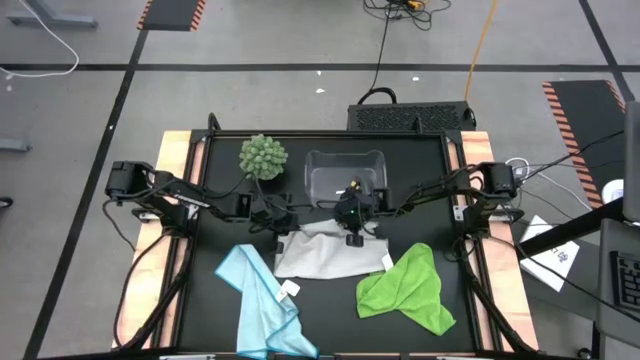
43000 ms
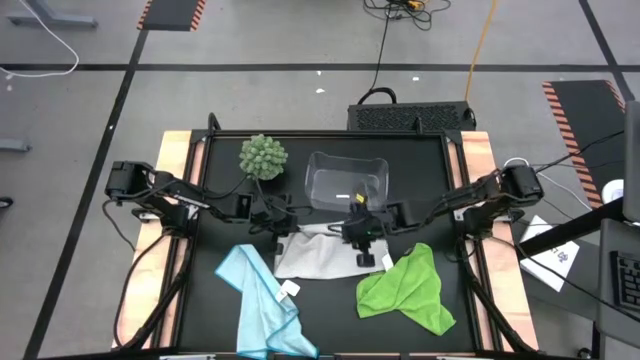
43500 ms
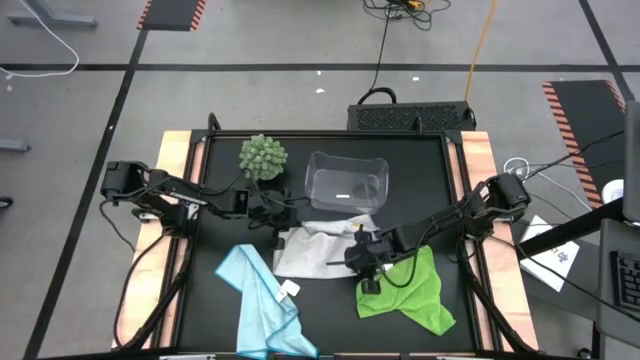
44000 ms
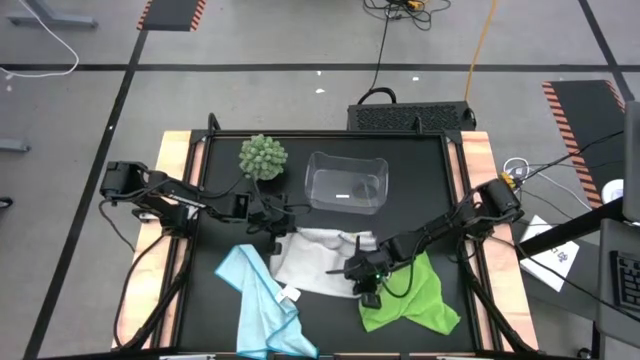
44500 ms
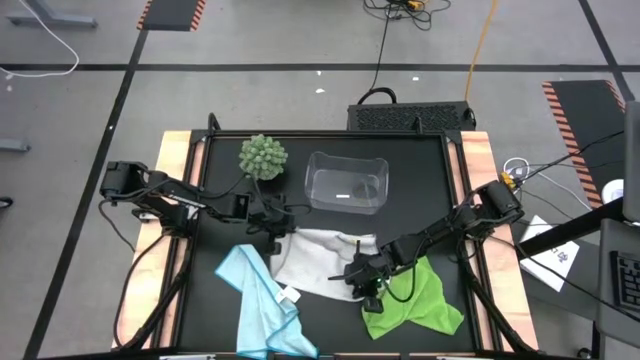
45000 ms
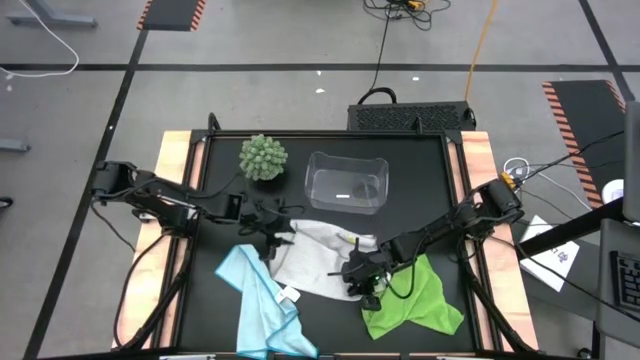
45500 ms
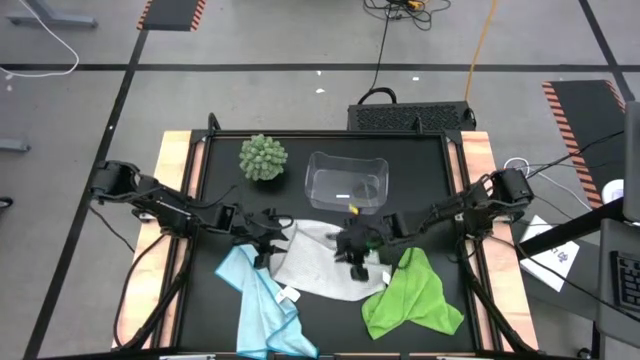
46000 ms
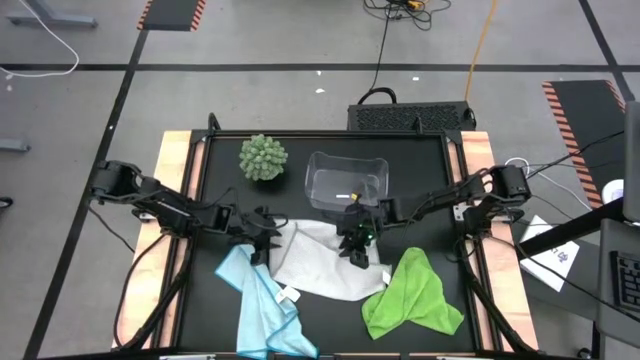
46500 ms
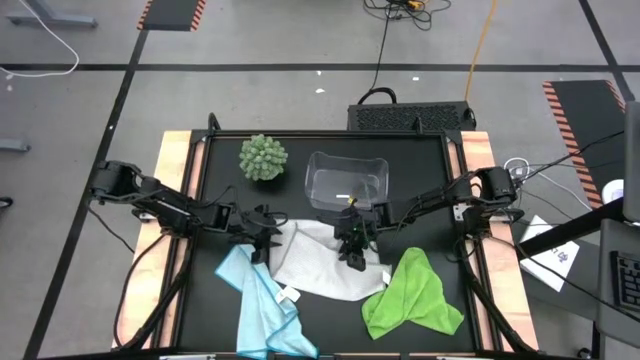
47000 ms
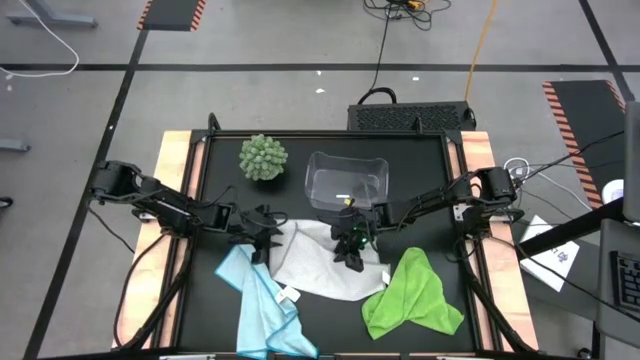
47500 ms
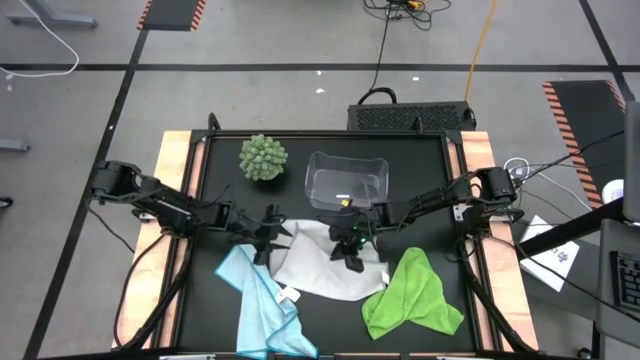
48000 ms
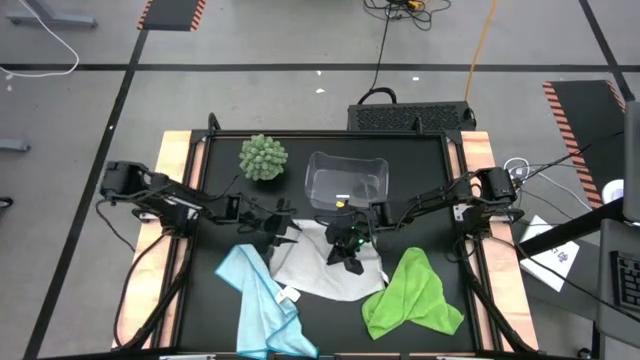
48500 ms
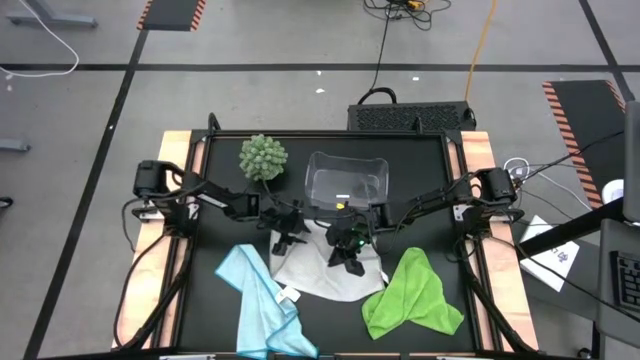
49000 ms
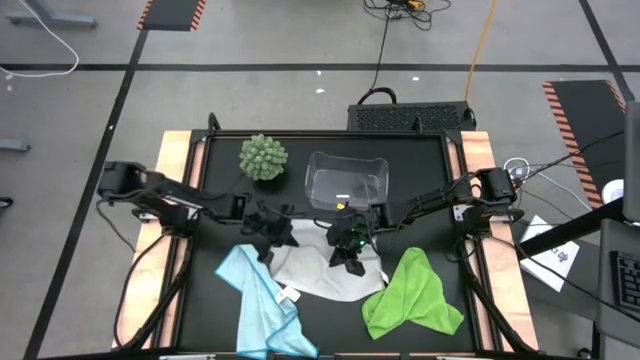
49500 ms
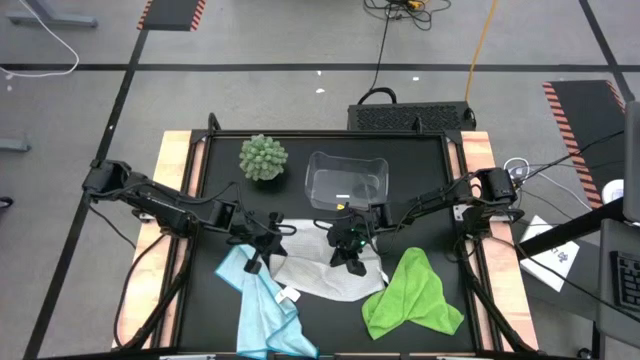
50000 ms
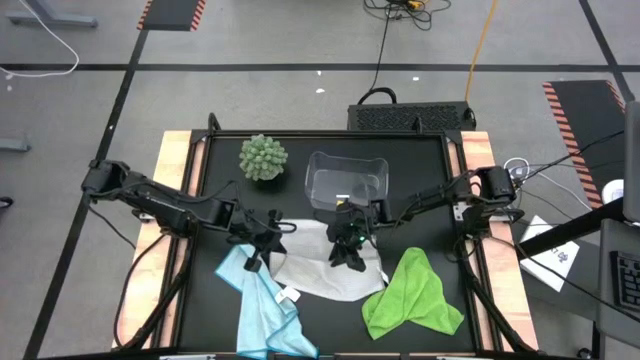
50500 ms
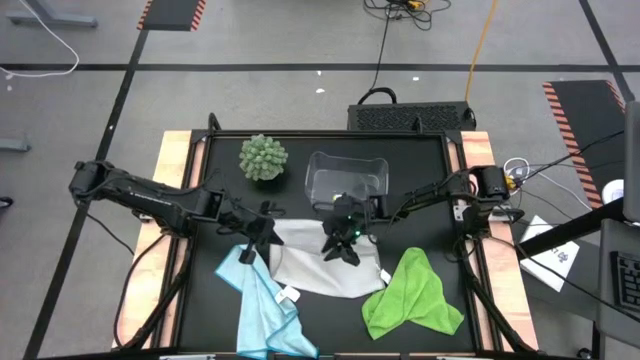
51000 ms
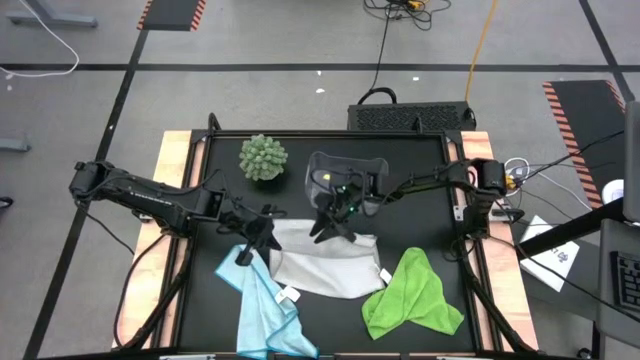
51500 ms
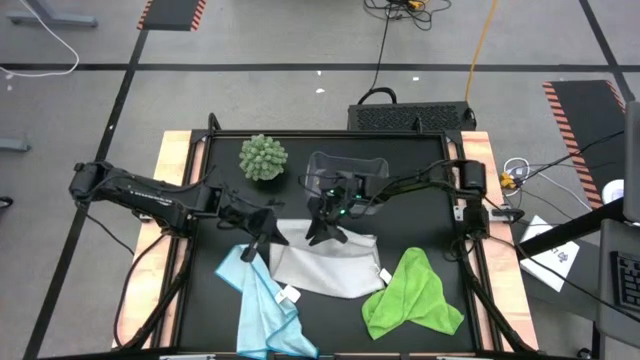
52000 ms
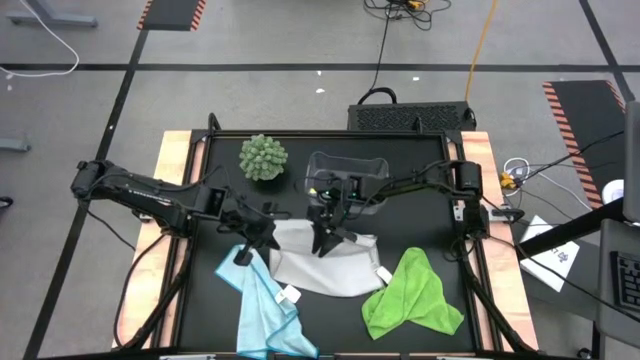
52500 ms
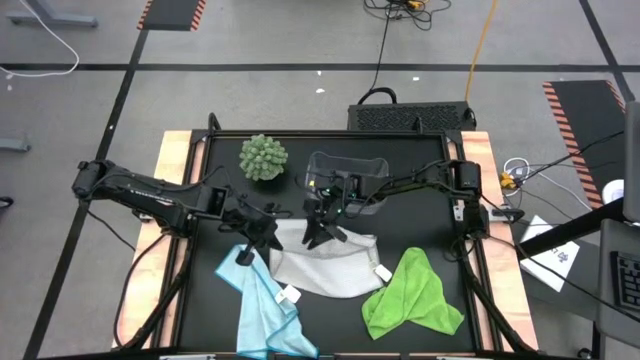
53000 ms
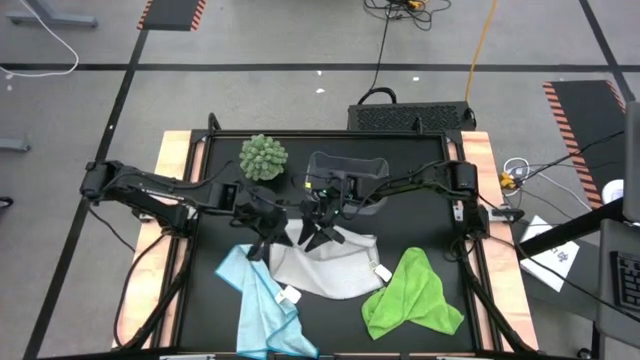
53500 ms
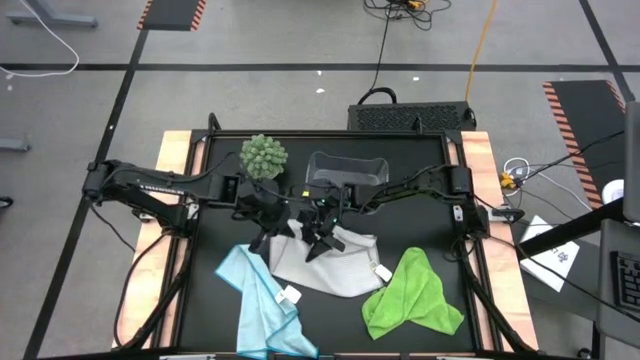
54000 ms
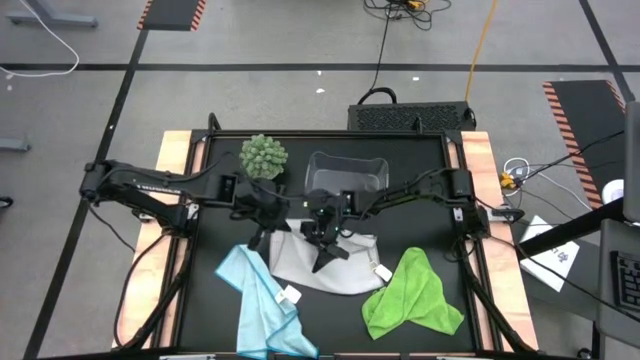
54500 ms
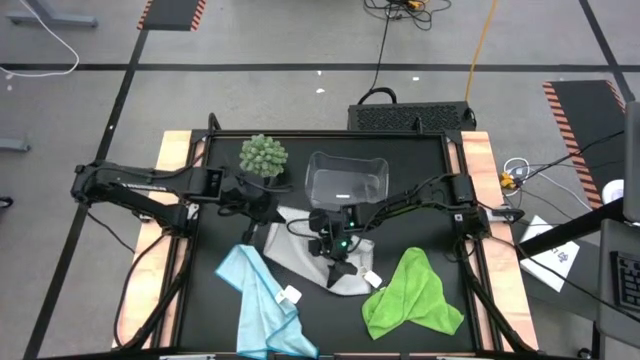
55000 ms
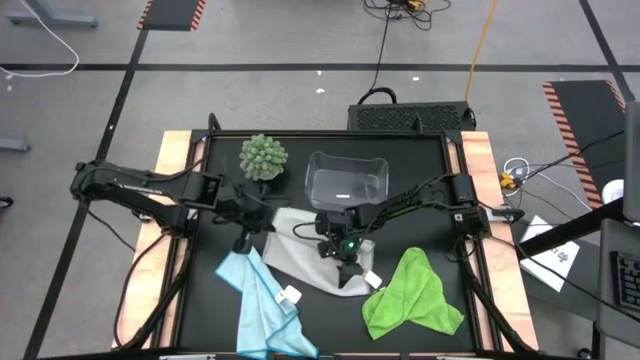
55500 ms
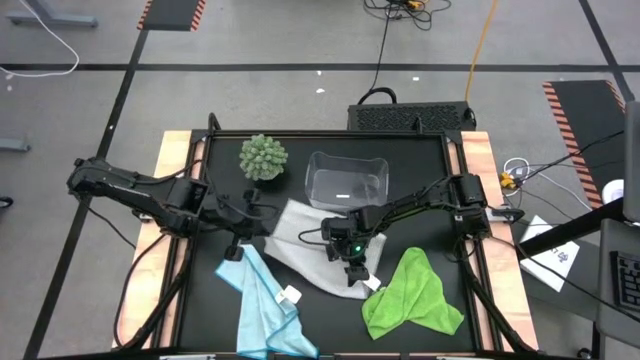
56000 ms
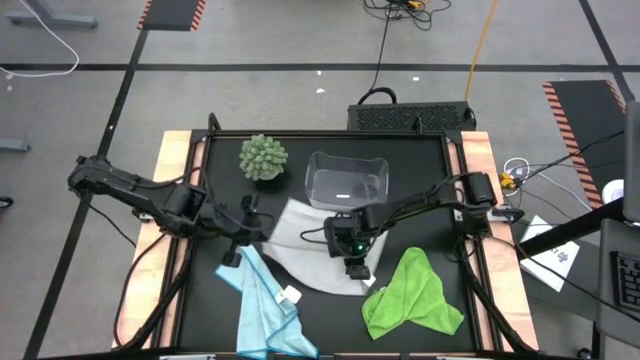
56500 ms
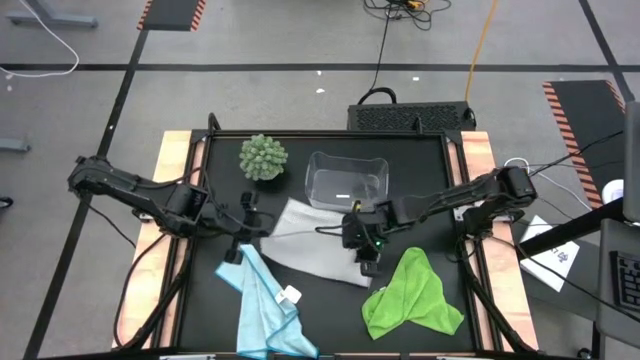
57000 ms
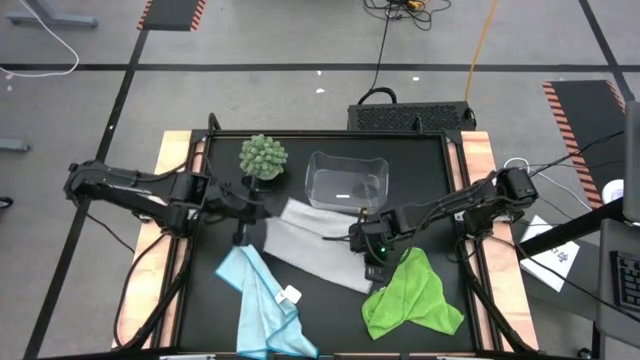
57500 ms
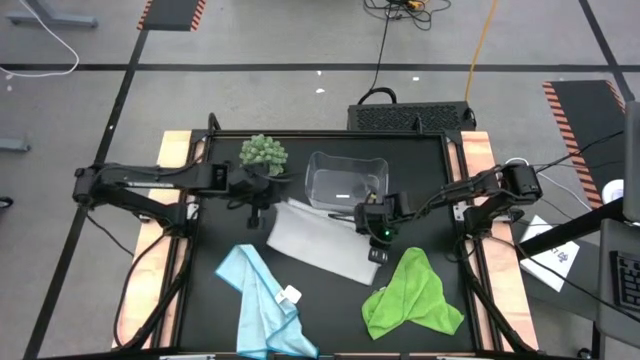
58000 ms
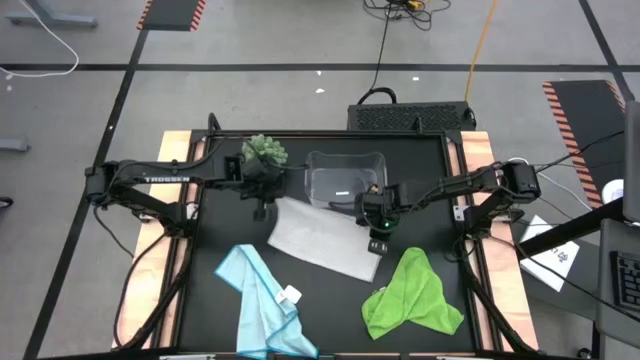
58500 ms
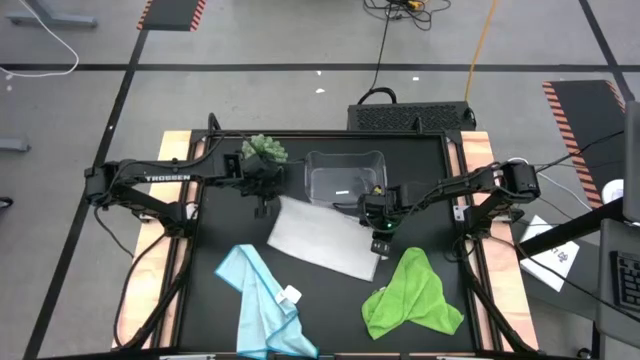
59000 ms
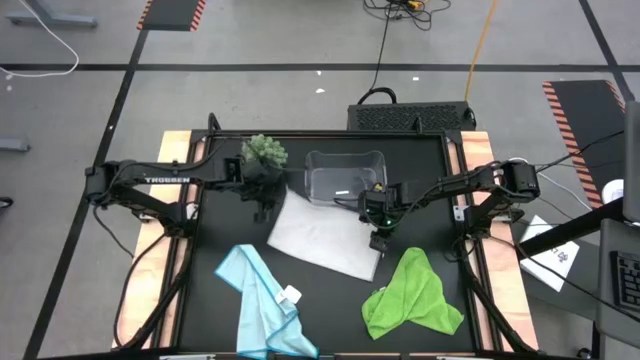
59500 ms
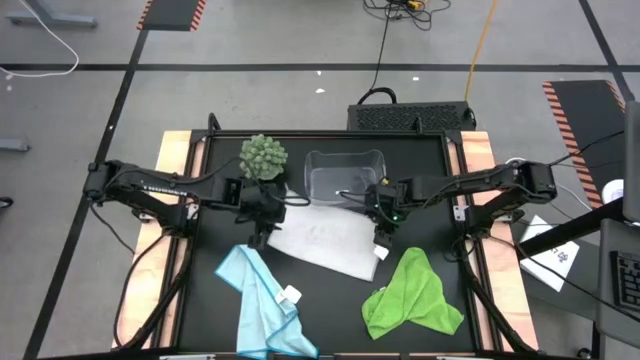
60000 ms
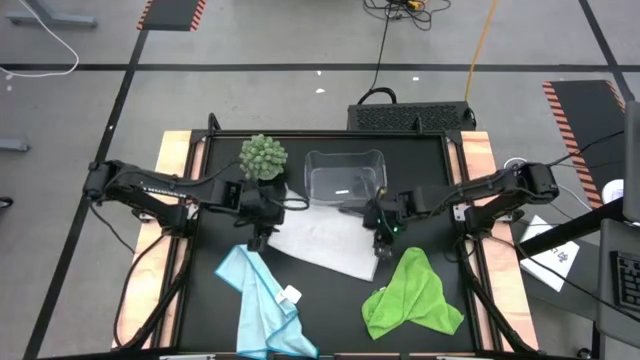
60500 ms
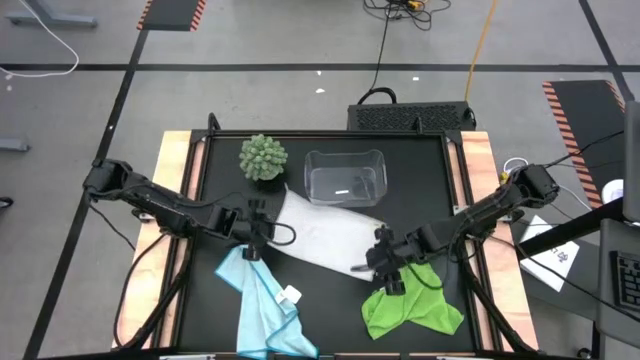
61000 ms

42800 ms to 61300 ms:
Task: Fold microfiber towels
Fold the gray towel

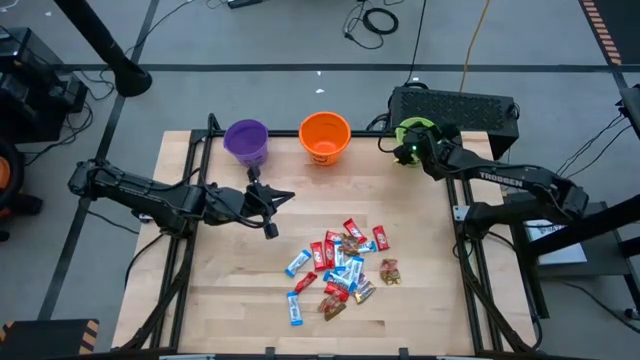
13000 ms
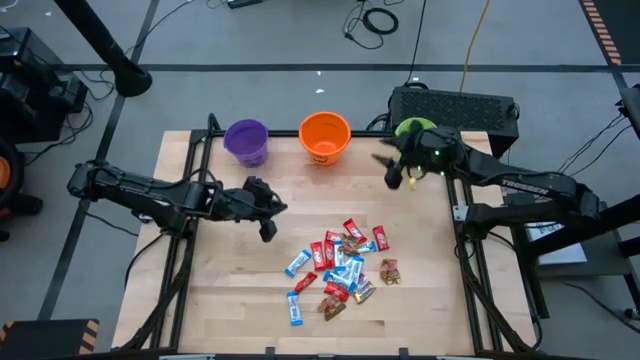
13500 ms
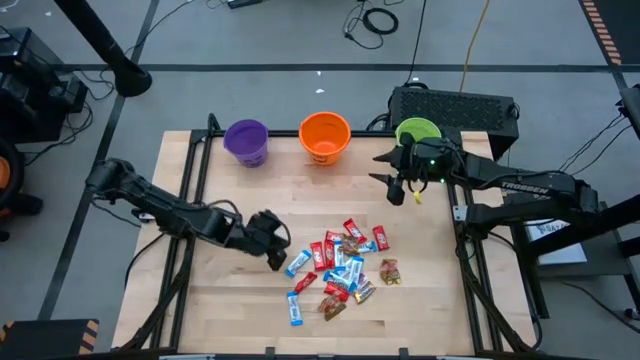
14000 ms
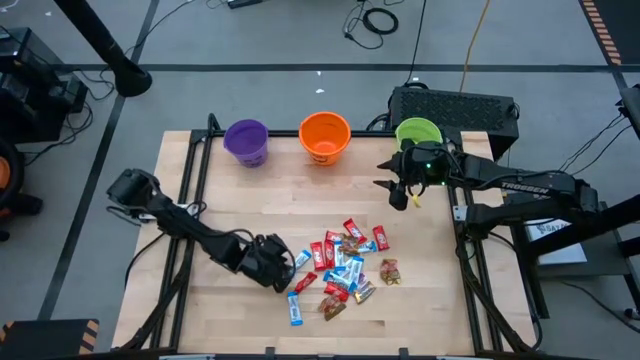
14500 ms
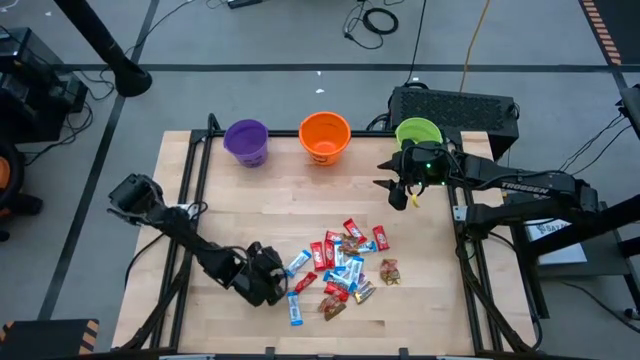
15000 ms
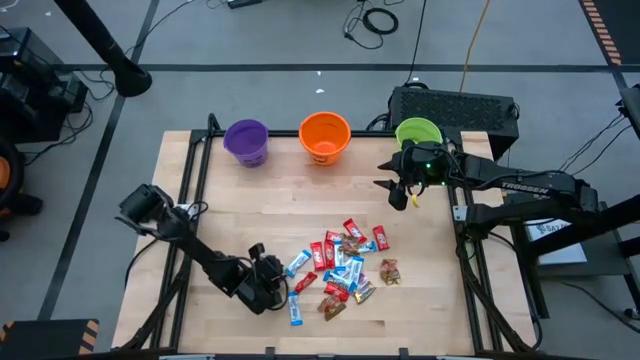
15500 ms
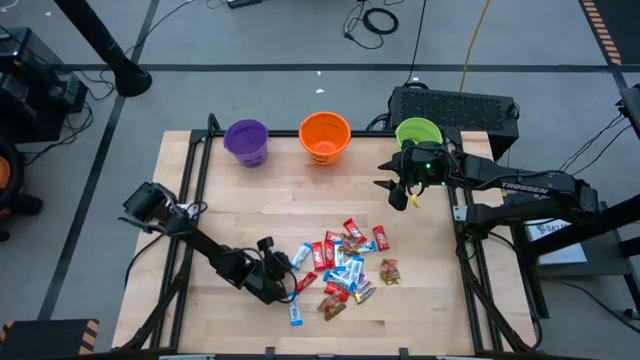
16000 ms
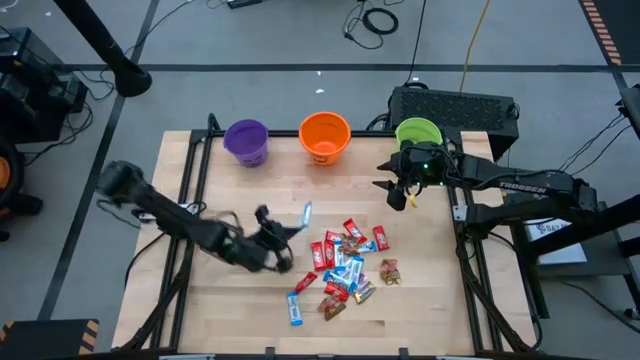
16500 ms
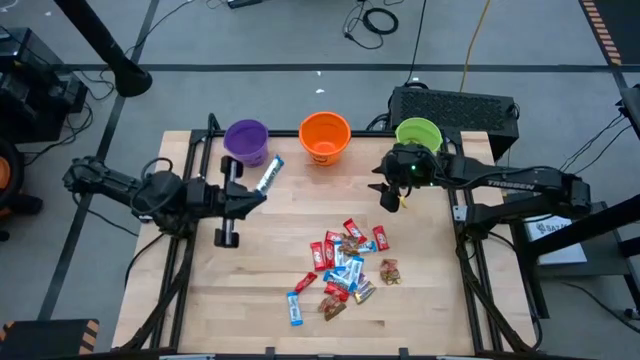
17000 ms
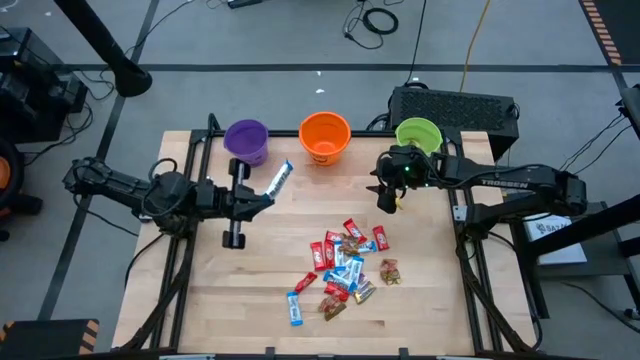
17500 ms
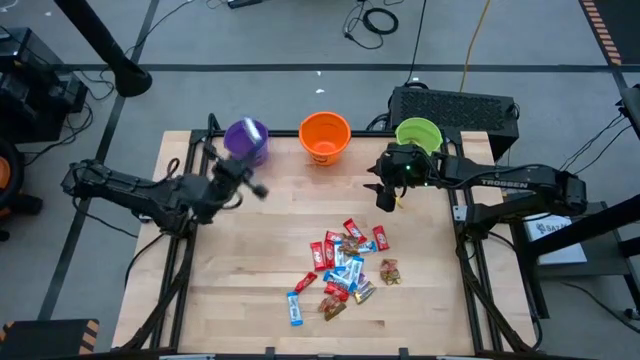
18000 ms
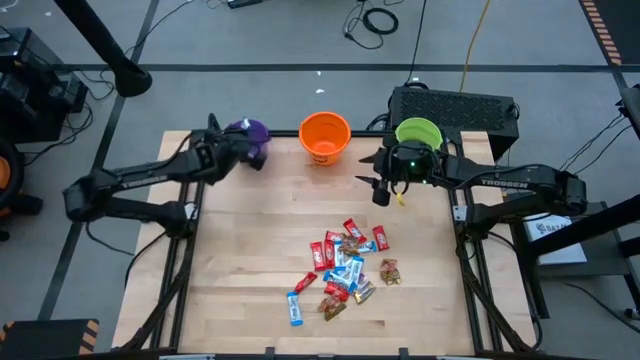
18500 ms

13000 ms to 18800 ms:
Task: Sort candy by brand, put in halloween buckets
Put the white chocolate into the purple bucket
